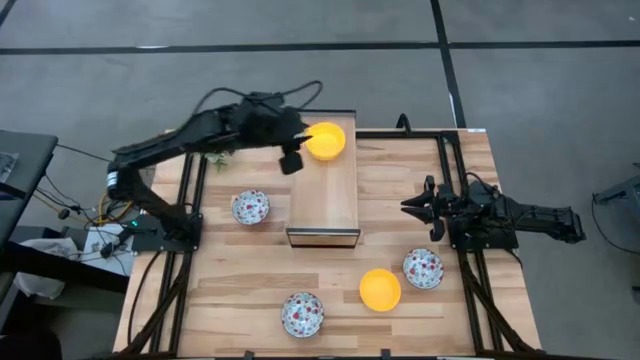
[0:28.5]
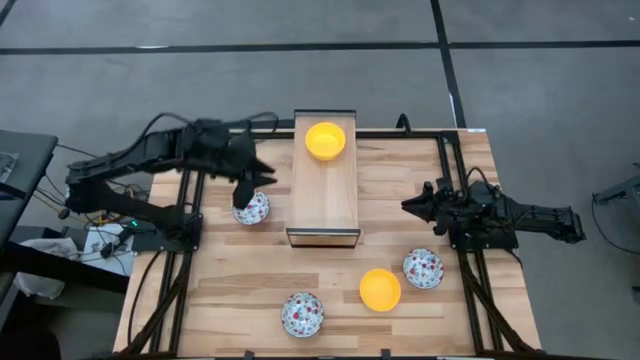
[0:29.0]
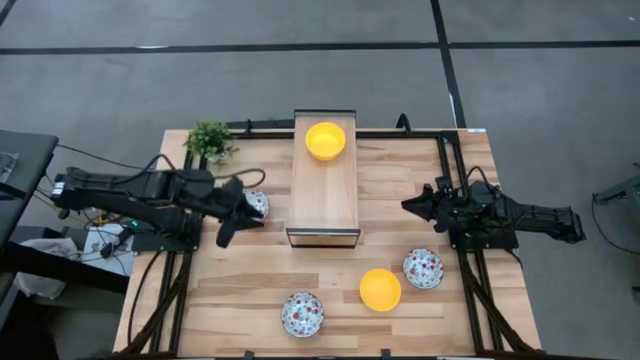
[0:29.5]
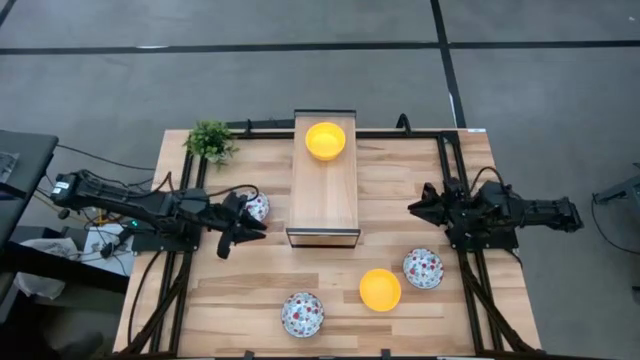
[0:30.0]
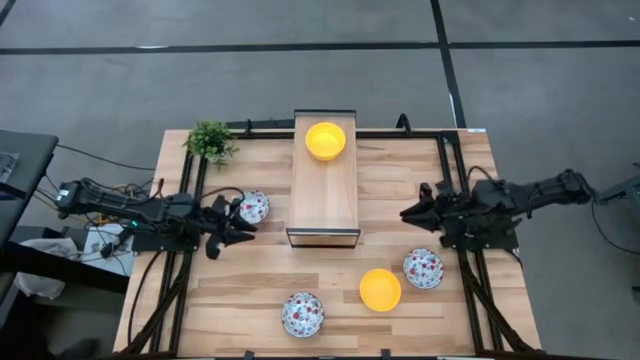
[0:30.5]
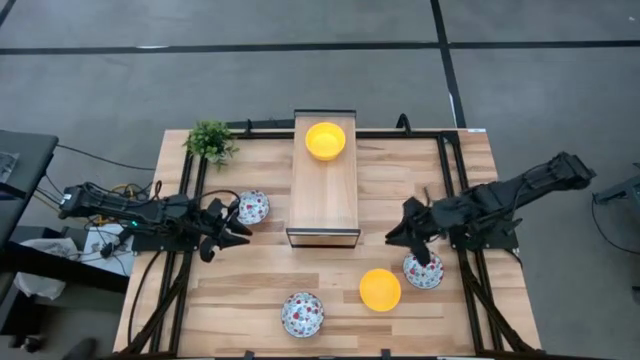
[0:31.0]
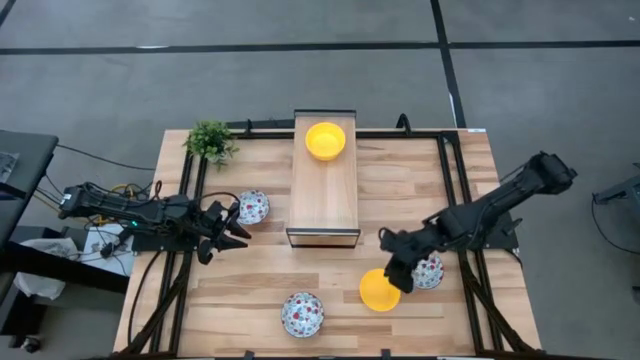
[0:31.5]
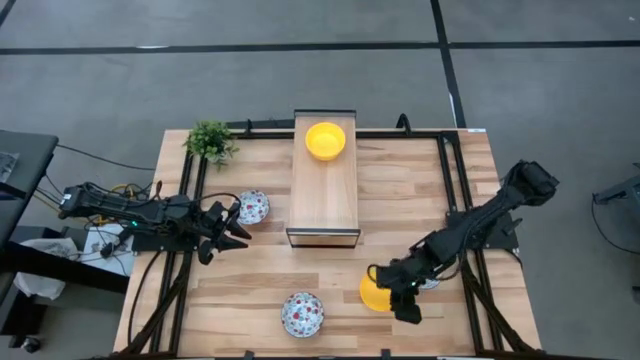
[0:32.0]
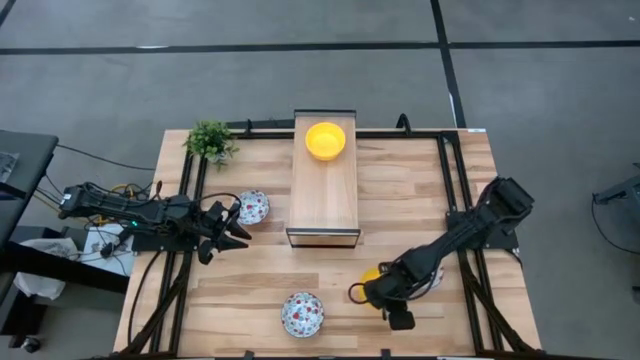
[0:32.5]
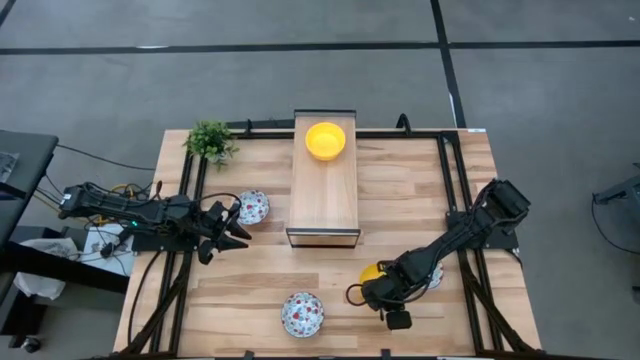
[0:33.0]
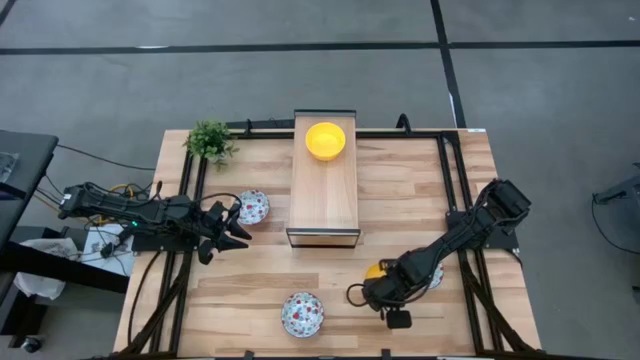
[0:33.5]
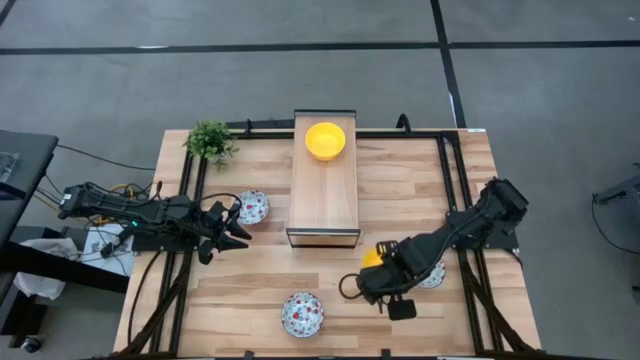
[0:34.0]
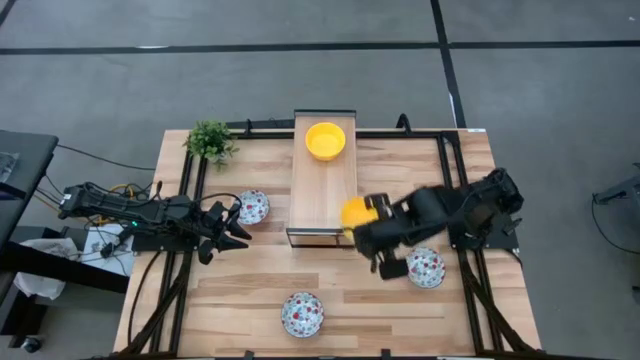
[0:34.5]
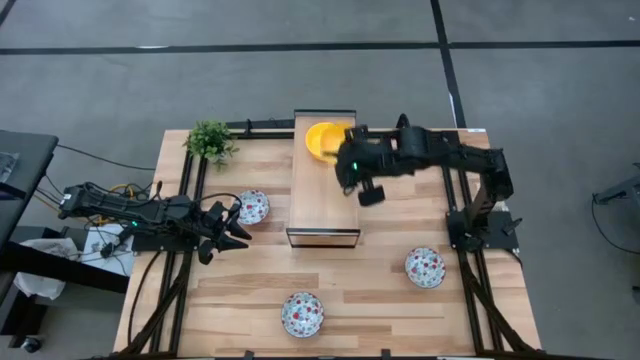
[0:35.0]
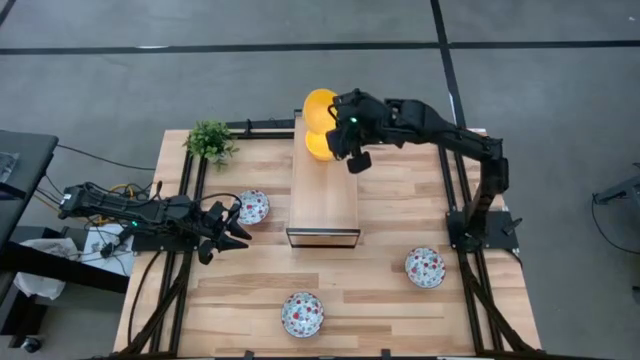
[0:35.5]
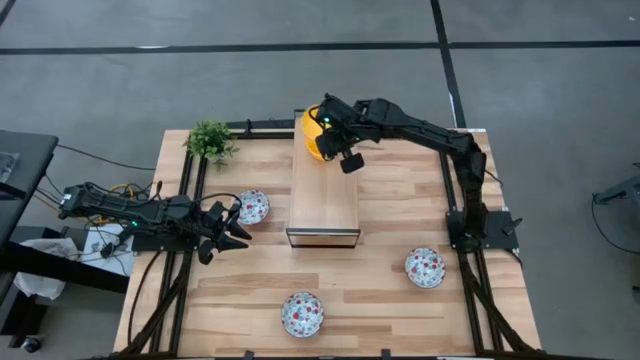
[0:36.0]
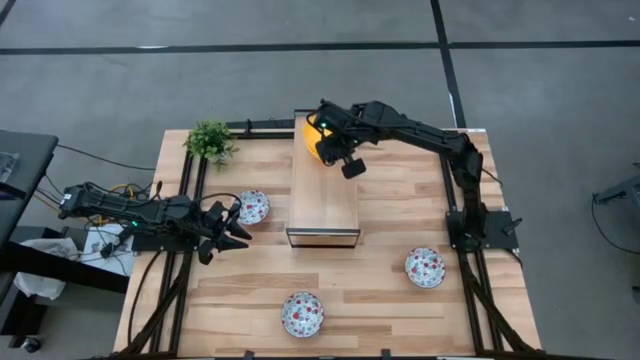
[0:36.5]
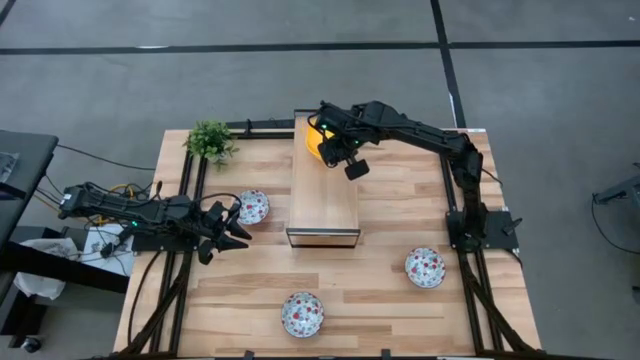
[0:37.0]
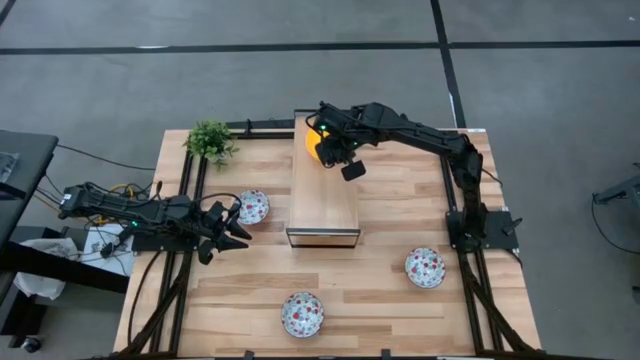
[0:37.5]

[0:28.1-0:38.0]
Task: Pick & Place Mini bowls
Stack the yellow bowl on top of the yellow bowl on the shelf

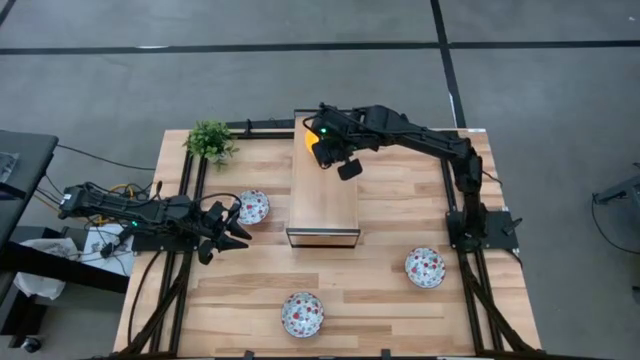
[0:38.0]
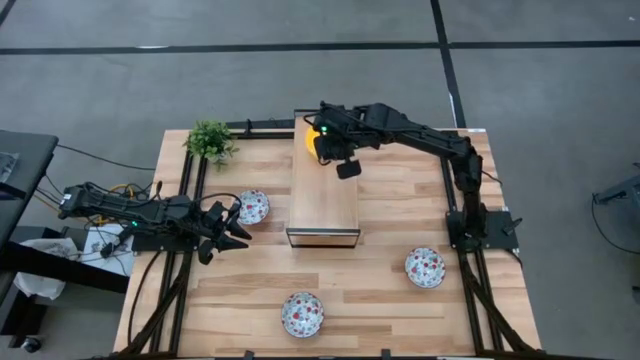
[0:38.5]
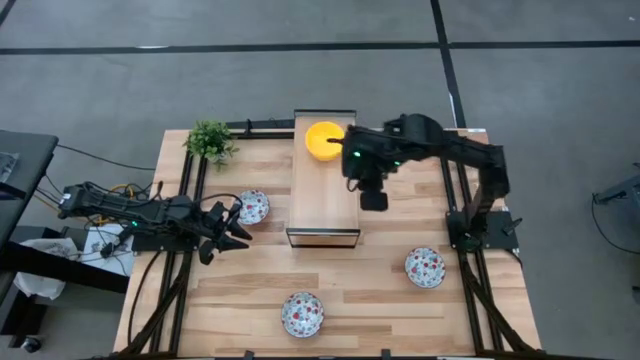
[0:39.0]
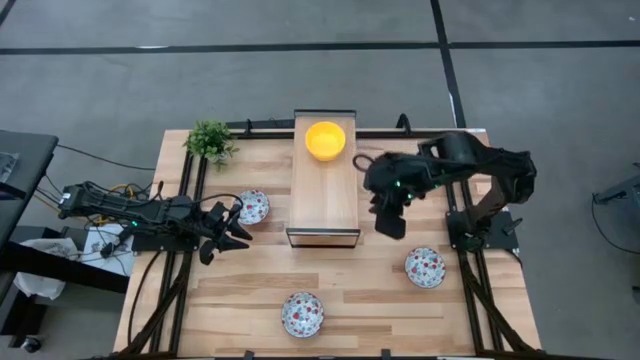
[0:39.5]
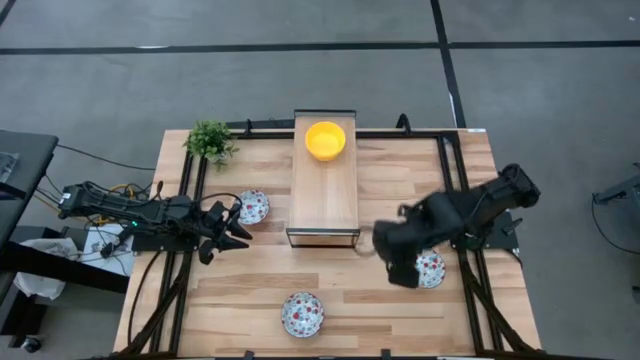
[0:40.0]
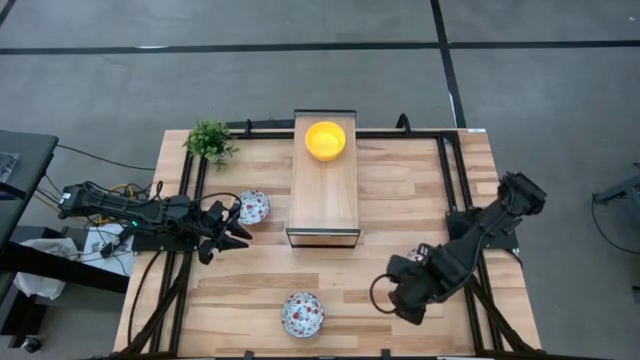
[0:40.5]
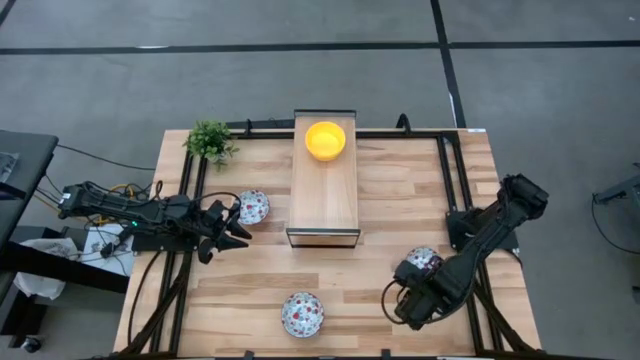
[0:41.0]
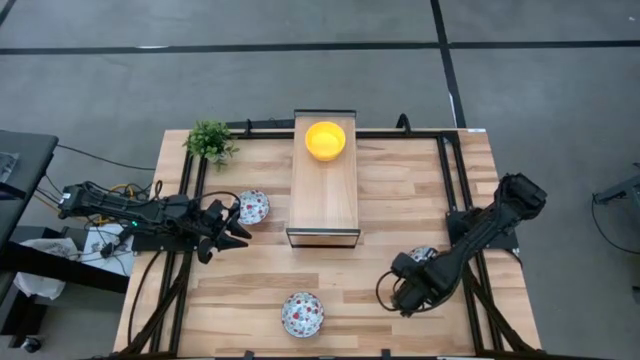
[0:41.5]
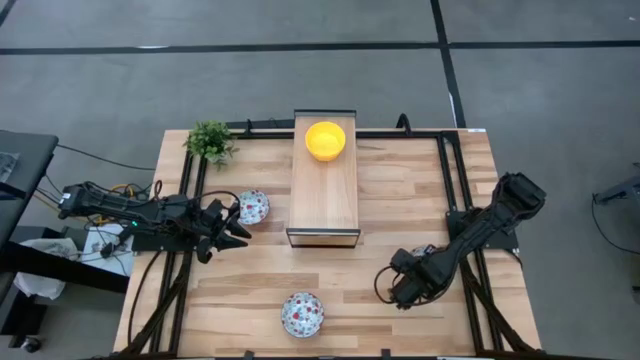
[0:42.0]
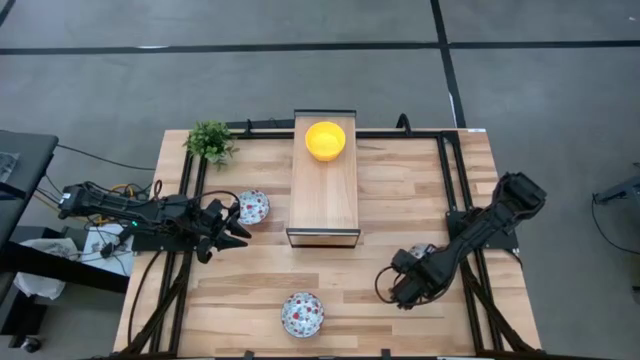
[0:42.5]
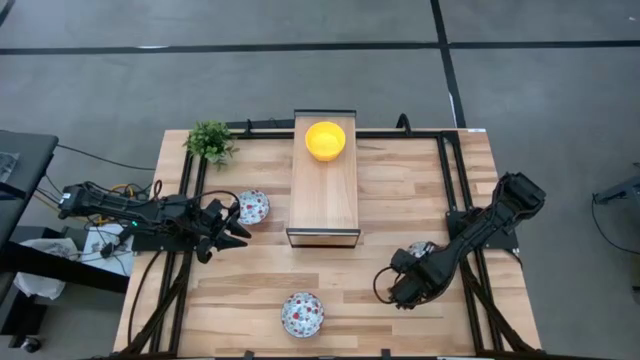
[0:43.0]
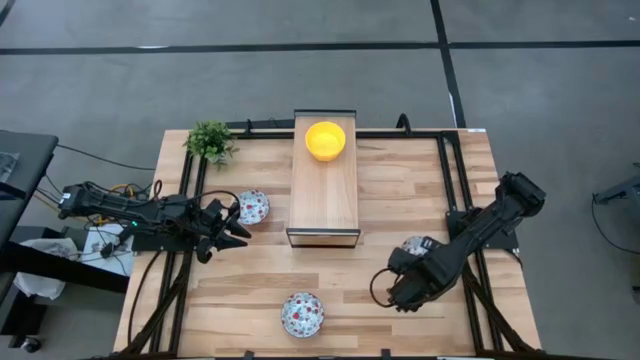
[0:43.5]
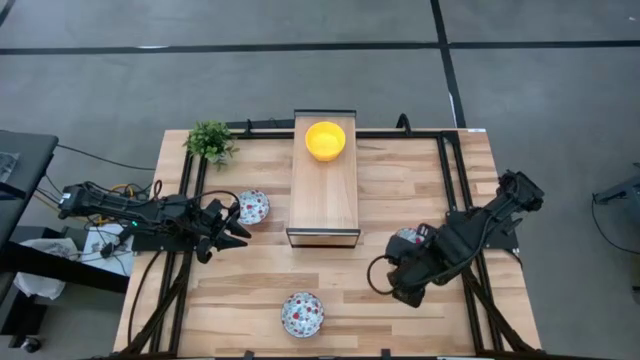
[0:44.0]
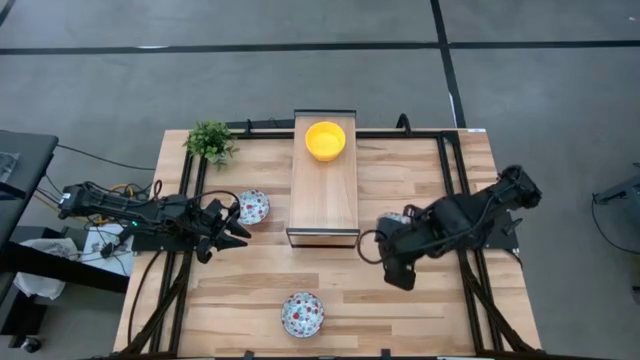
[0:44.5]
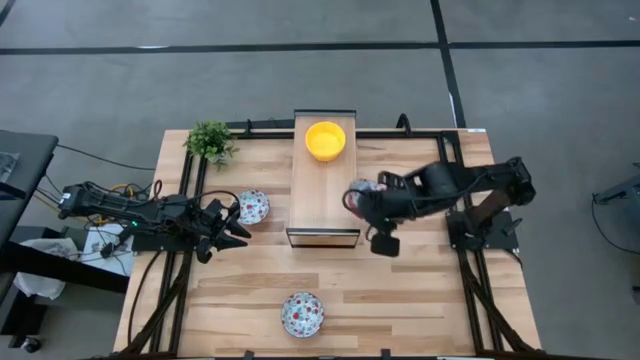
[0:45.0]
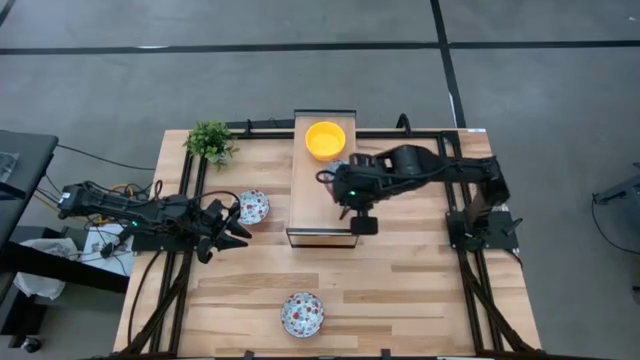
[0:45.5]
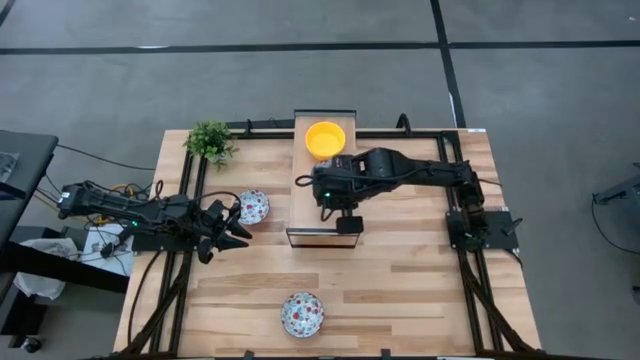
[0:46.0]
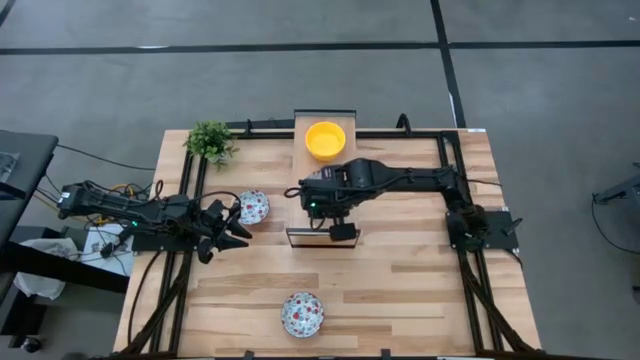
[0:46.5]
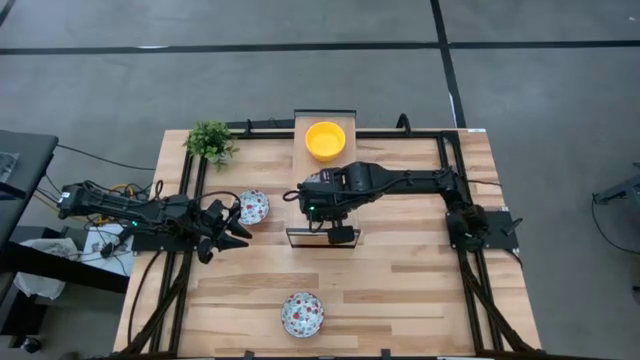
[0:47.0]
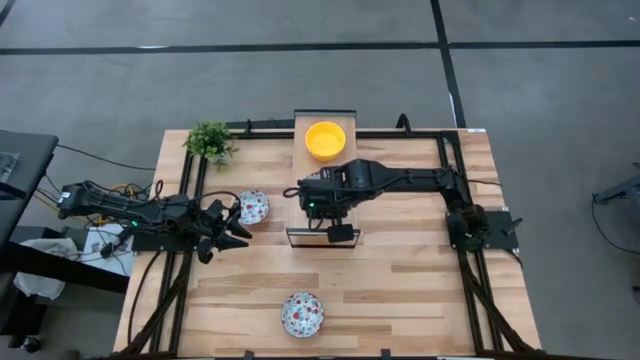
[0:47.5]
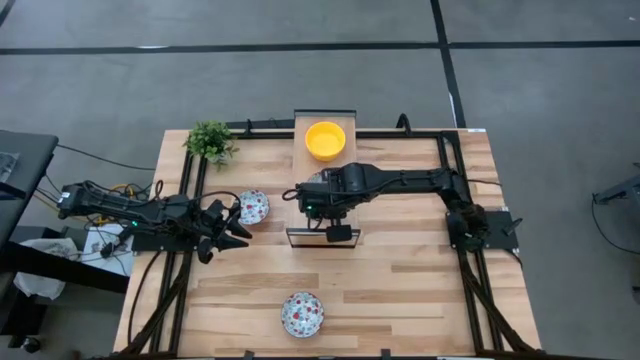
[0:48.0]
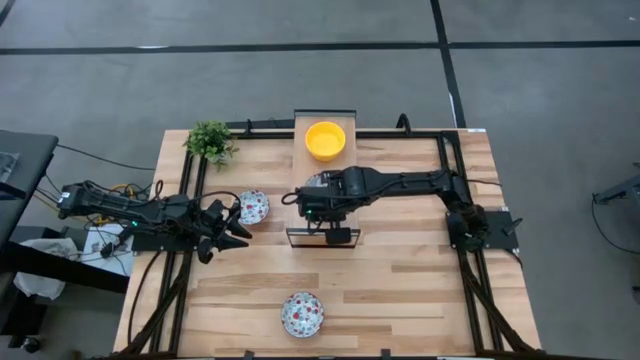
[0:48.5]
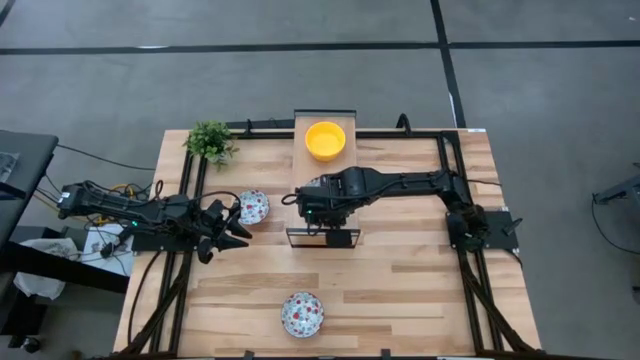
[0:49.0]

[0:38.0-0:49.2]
Put the middle white patterned bowl on the shelf

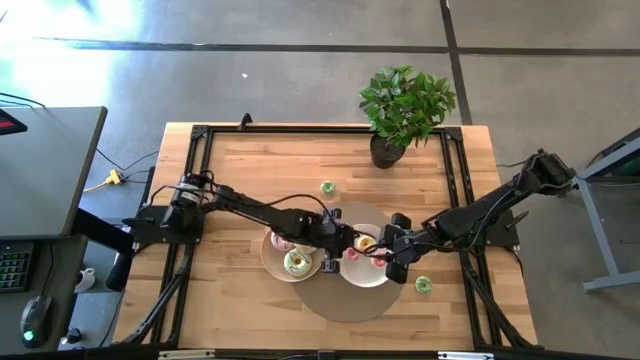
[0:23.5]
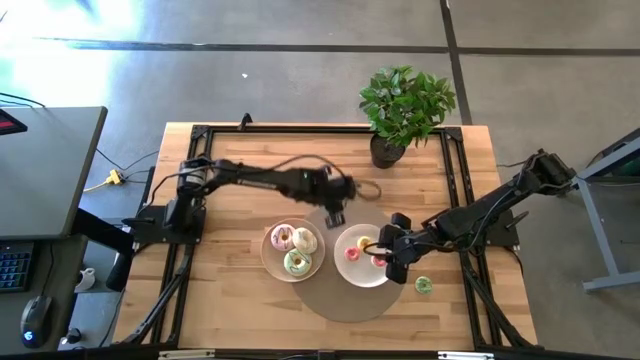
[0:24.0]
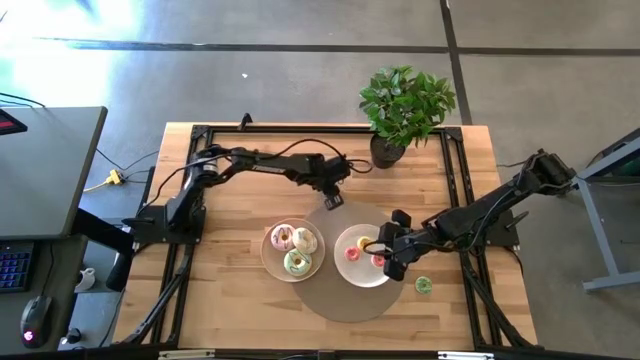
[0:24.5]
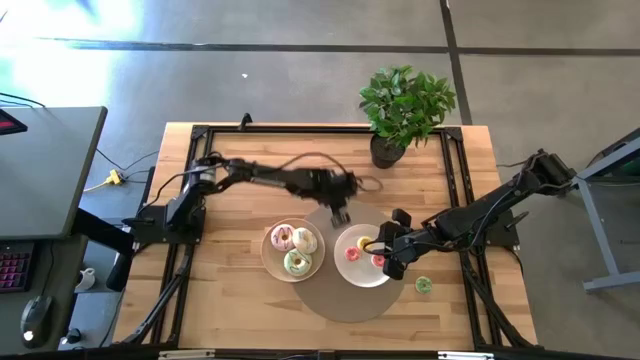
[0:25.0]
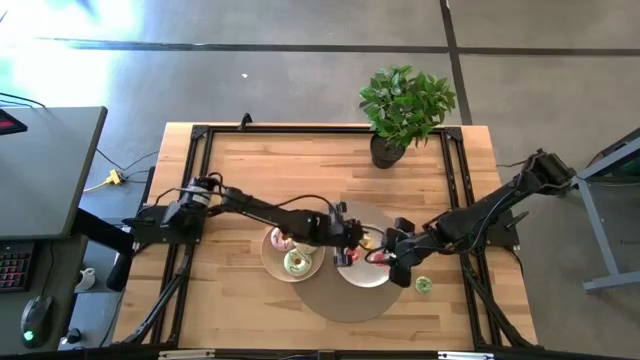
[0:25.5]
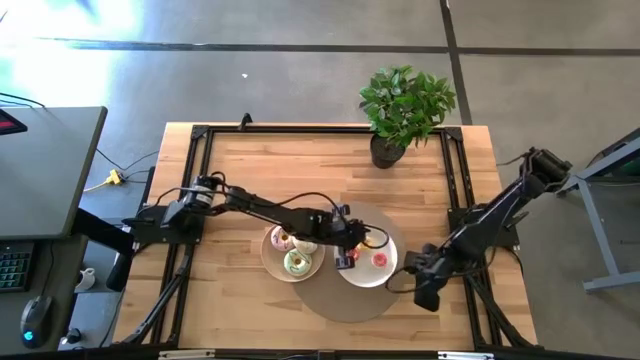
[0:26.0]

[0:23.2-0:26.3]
Task: Pick & Place donuts
Put the top small green donut on the white plate
